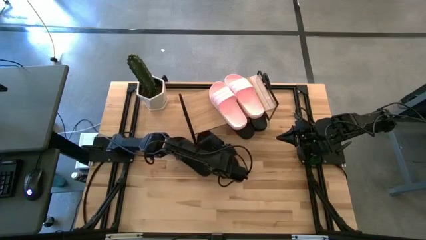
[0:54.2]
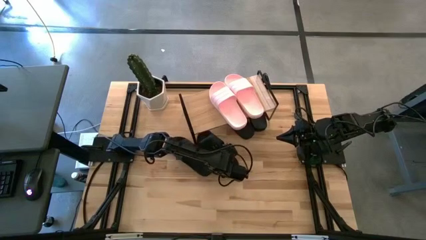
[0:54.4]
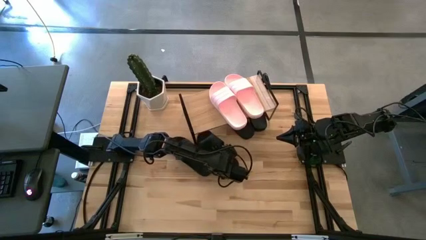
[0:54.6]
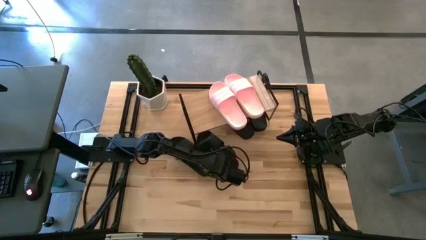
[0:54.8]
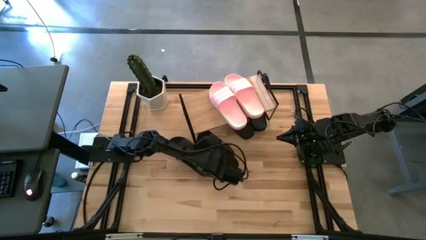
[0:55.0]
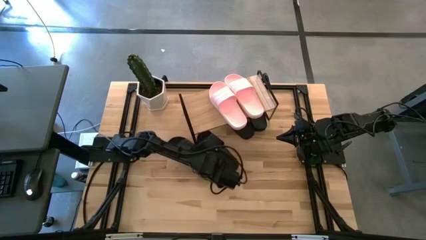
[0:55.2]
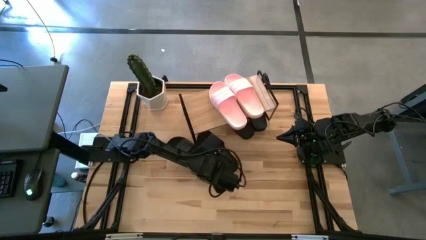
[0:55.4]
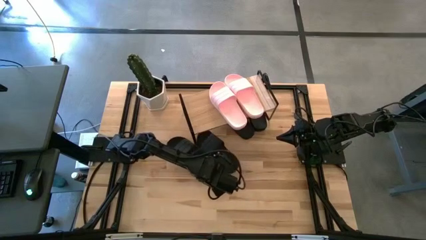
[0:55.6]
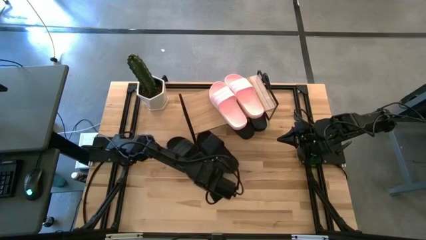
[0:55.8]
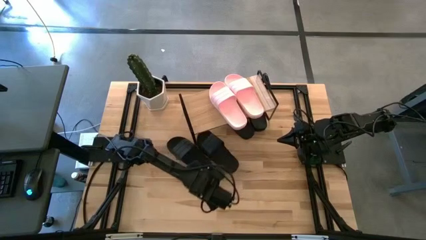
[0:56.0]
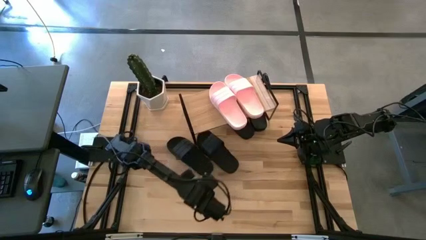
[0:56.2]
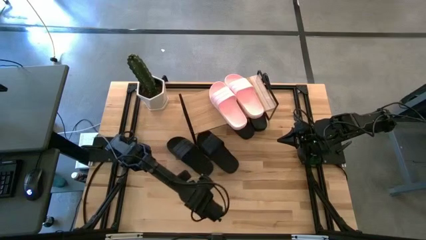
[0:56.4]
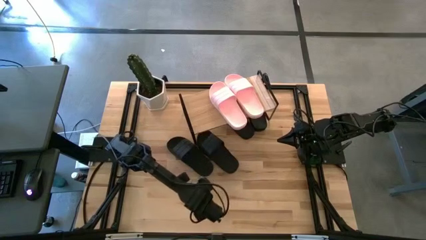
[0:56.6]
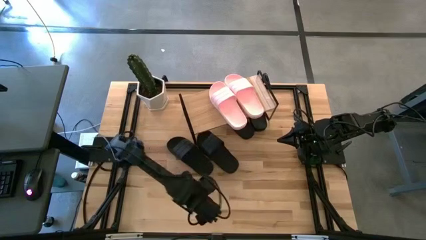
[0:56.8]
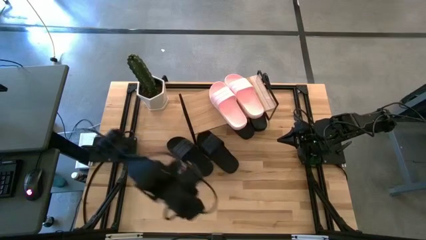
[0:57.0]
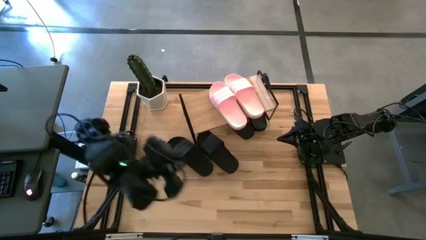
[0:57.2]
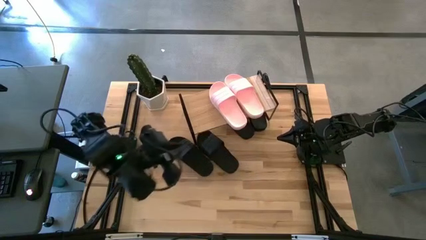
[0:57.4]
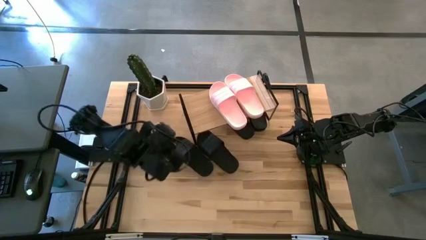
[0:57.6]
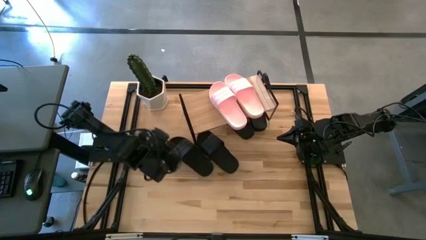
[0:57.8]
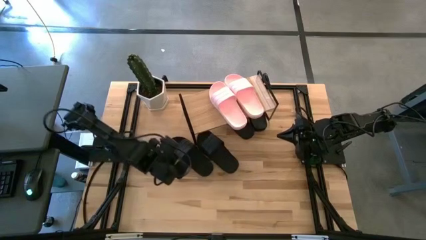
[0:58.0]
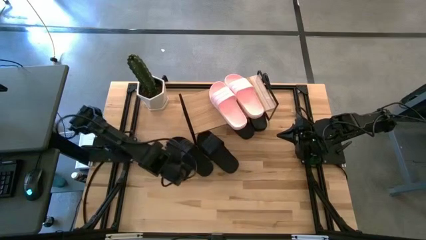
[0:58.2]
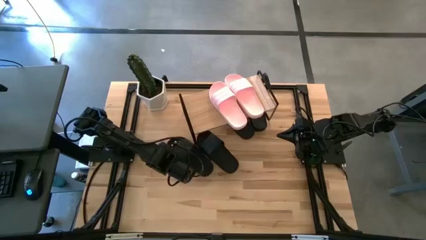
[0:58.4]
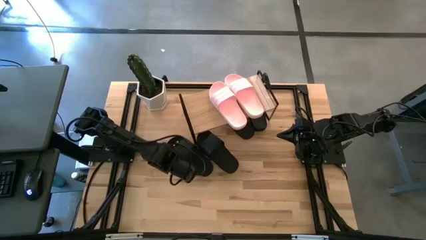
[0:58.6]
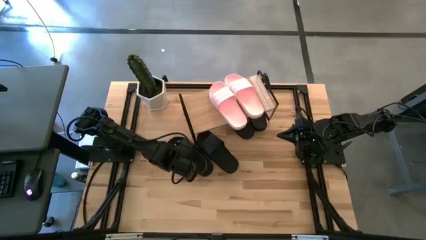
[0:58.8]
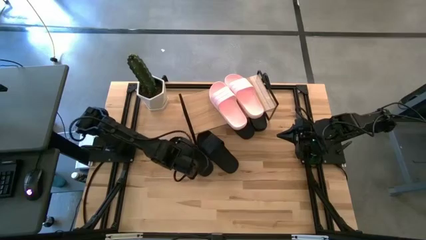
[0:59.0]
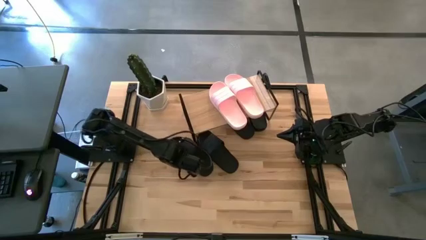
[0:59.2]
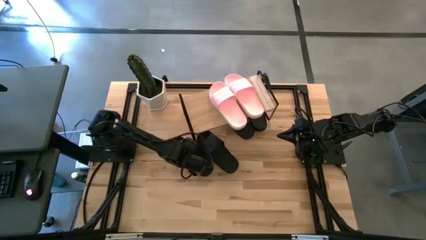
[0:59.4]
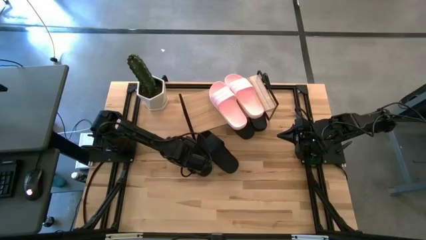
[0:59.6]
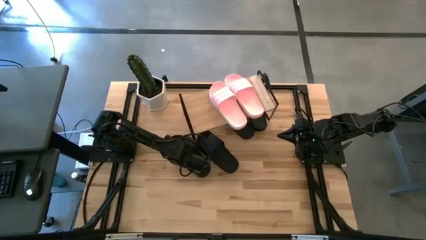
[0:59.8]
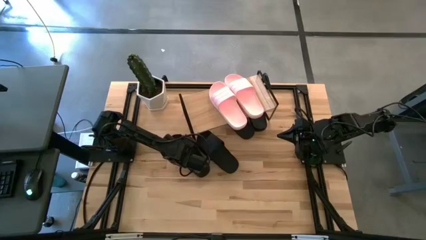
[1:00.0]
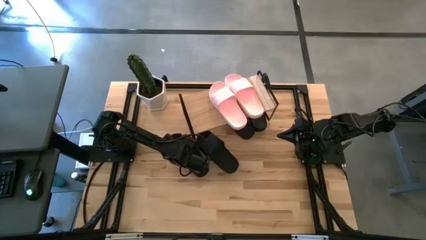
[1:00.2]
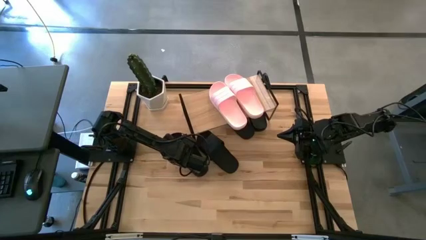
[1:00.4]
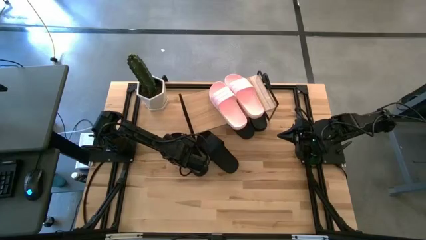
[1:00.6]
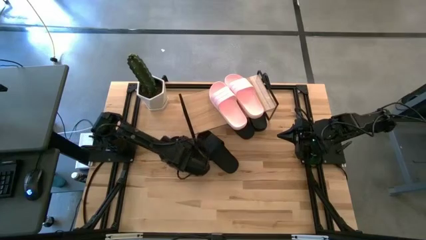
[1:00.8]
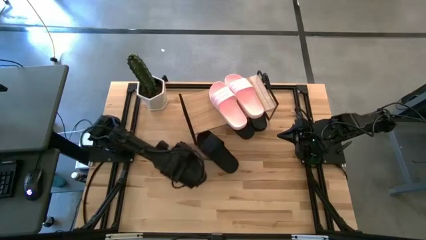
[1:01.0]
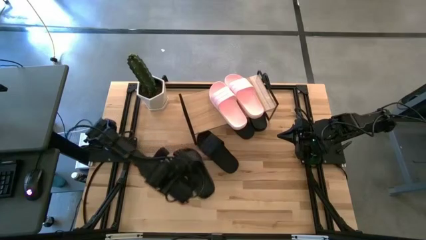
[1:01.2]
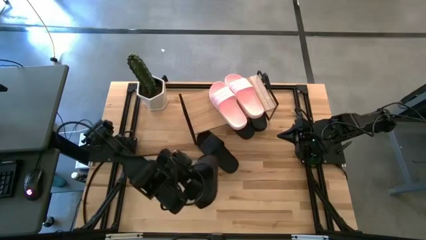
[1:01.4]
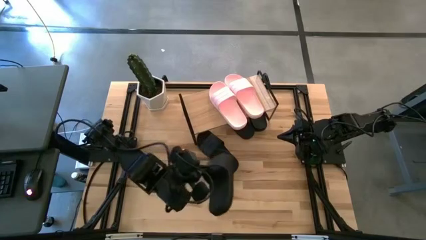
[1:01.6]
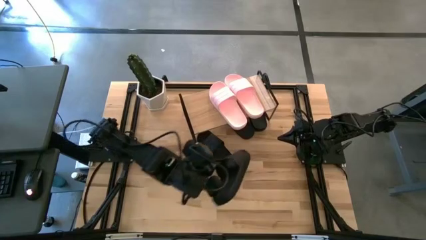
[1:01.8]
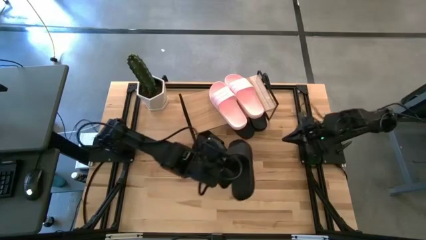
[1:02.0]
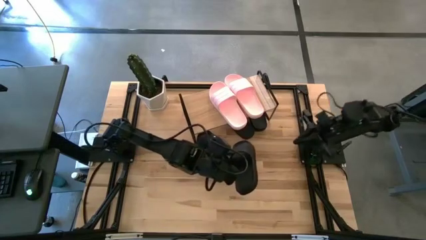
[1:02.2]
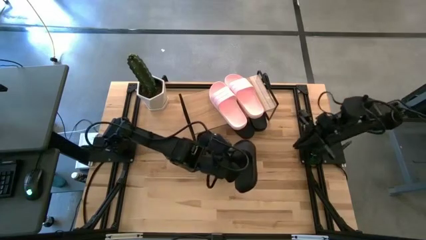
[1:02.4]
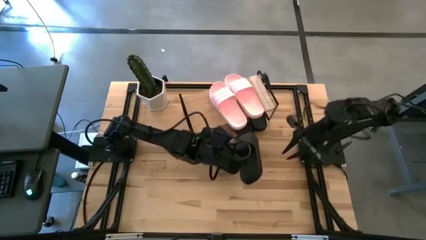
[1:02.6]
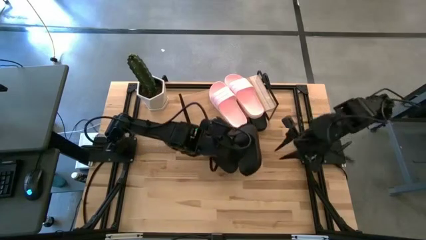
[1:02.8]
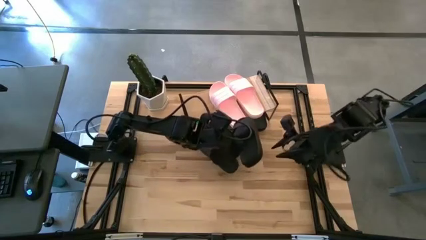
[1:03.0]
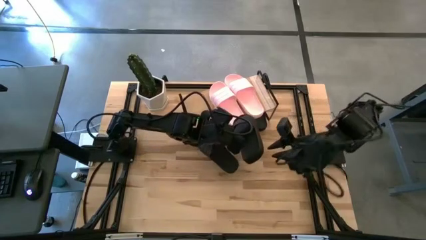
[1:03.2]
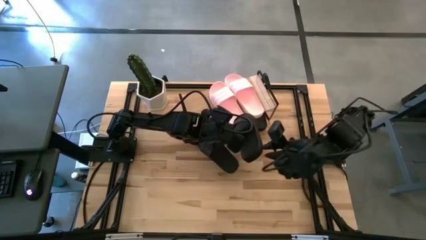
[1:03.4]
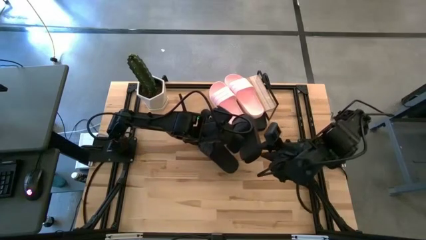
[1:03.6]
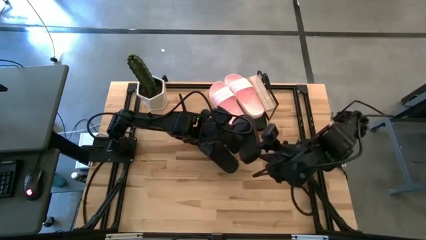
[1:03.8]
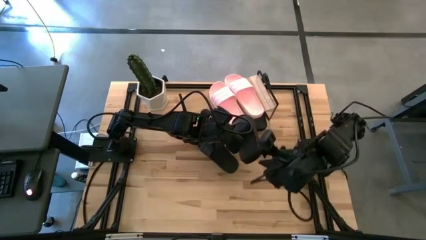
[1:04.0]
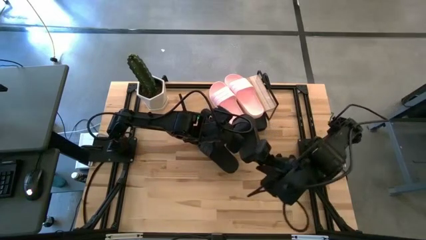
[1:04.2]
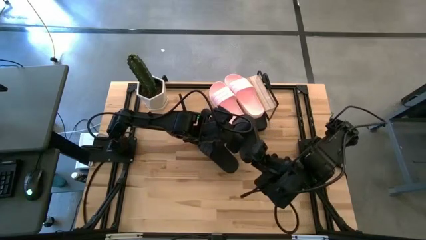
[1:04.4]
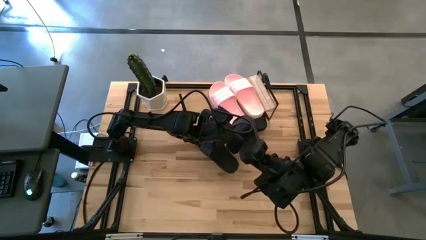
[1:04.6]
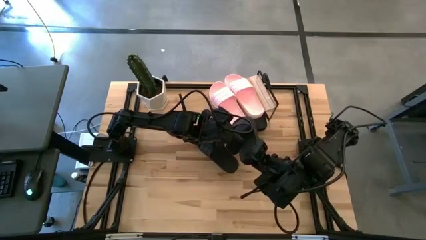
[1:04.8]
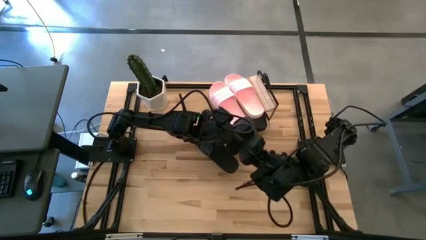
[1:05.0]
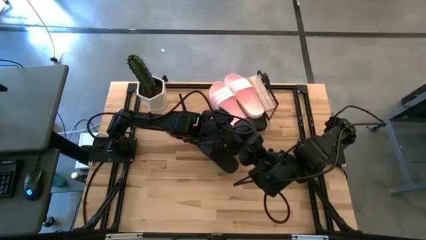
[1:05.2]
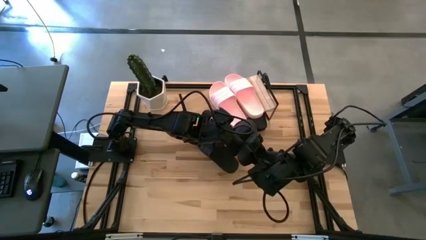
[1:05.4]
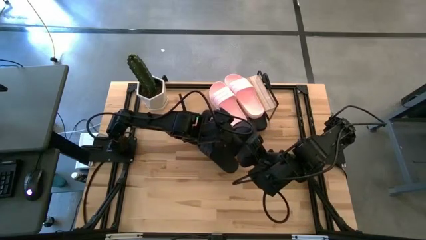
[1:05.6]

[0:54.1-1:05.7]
Task: Pick and place slides into the shelf
Put the black slide under the shelf

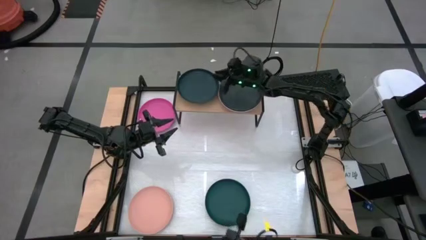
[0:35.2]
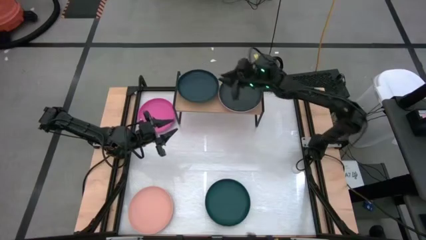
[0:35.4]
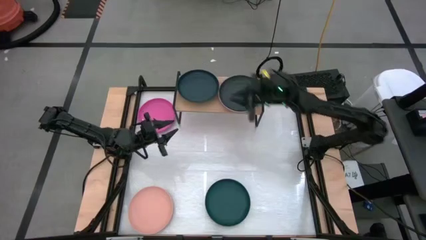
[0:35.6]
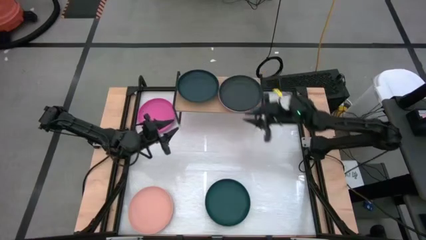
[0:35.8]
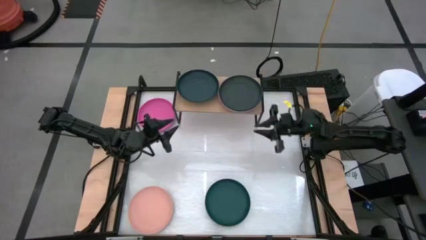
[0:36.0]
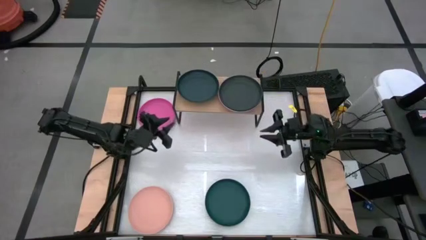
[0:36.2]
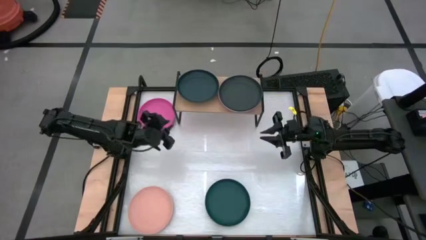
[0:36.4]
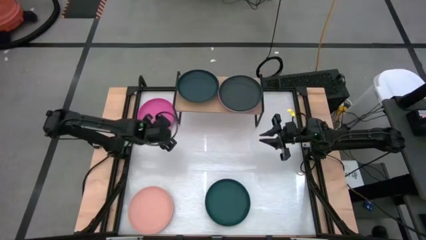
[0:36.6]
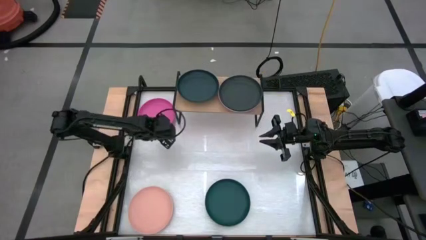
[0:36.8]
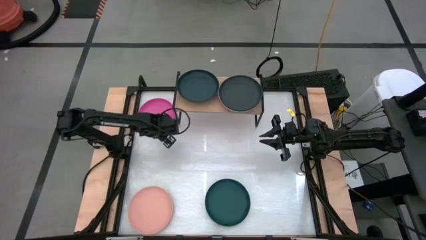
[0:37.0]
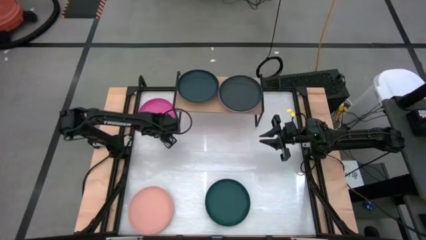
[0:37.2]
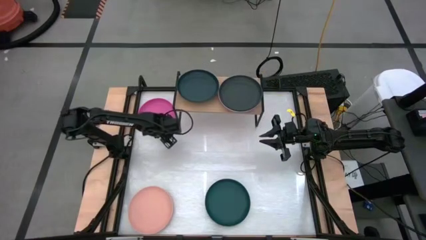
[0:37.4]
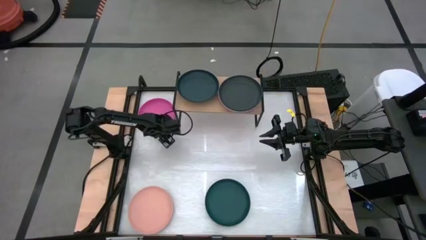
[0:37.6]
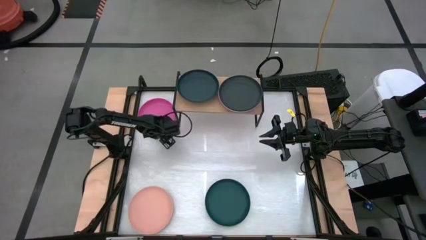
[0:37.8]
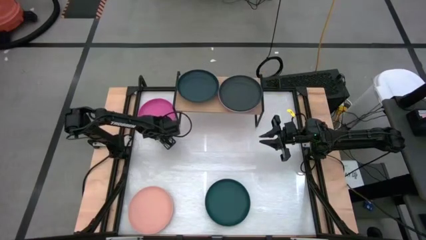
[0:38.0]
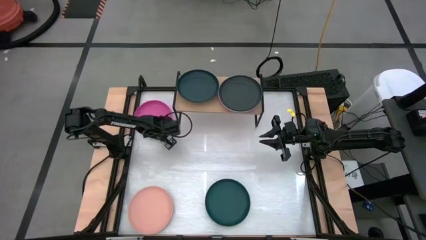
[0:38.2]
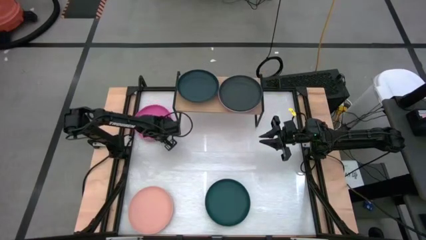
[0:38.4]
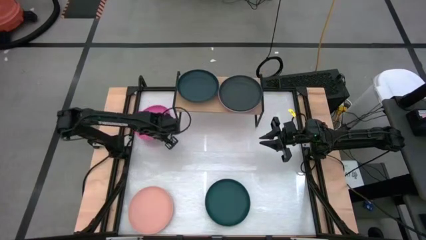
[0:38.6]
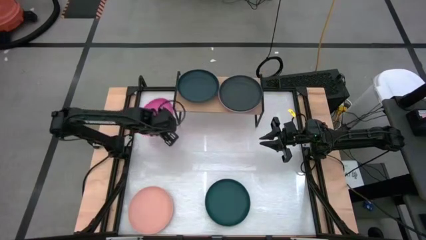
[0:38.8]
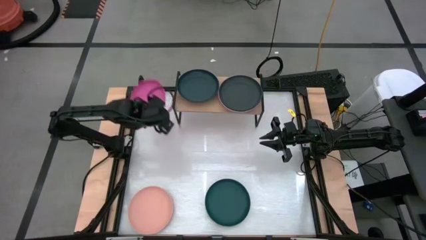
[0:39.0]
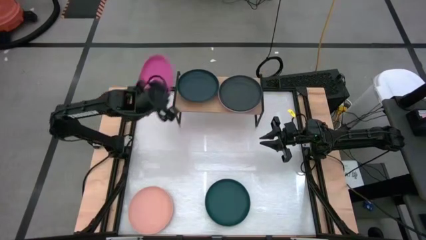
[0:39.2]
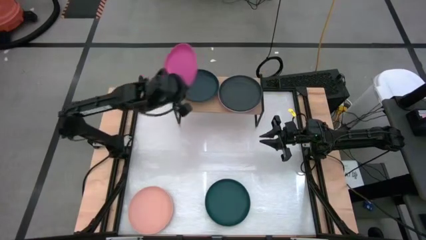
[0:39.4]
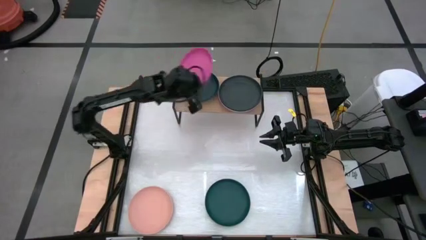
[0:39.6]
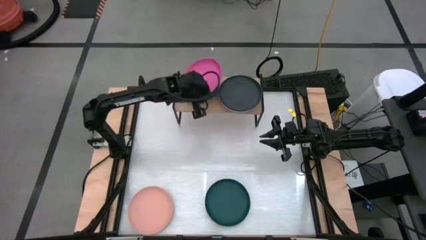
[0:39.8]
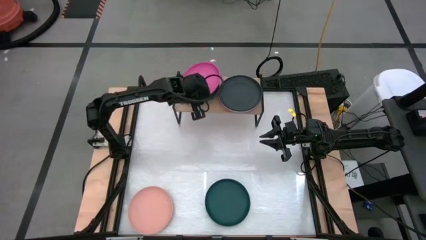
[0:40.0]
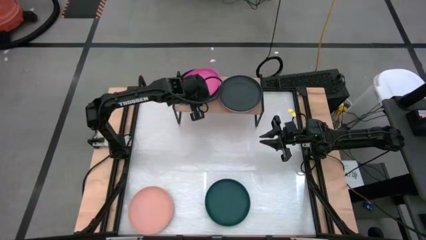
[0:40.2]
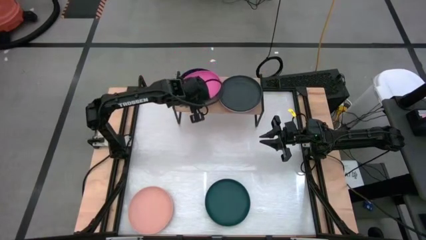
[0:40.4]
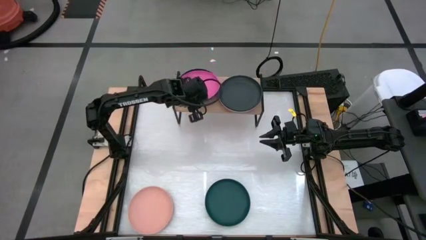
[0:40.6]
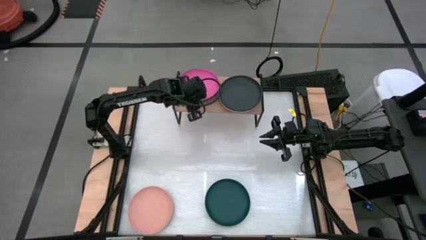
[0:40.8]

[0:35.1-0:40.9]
Task: Place and stack plates onto a shelf
Stack the pink plate on top of the dark green plate on the shelf
